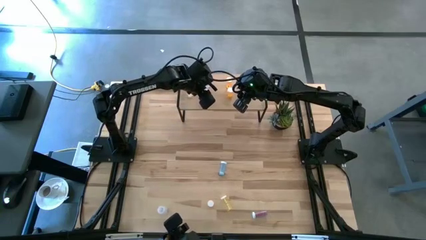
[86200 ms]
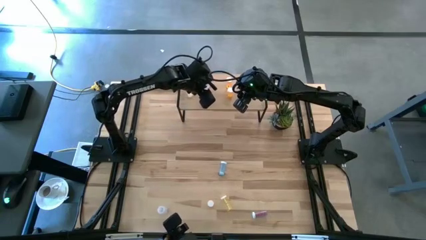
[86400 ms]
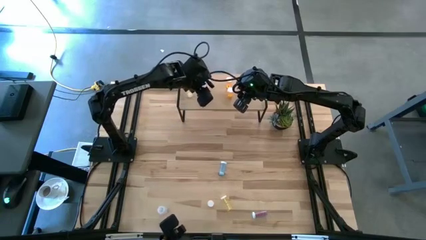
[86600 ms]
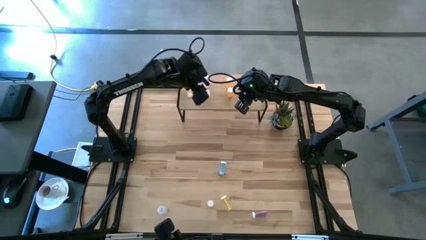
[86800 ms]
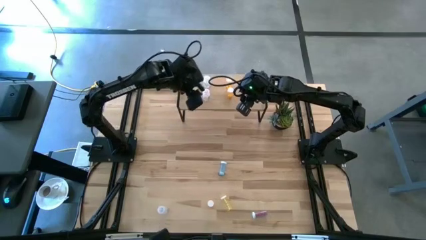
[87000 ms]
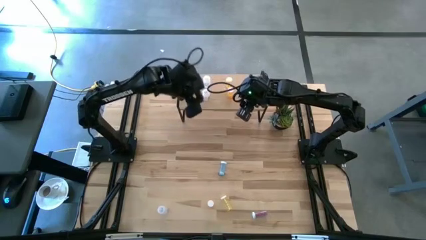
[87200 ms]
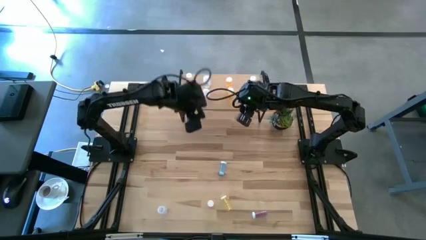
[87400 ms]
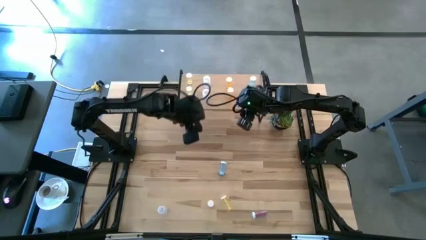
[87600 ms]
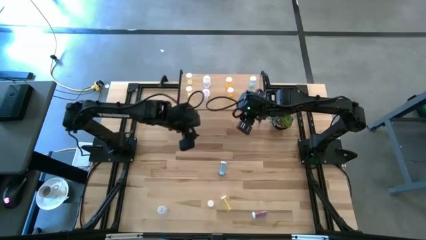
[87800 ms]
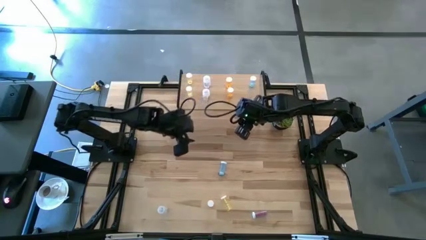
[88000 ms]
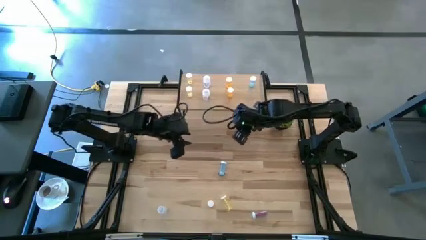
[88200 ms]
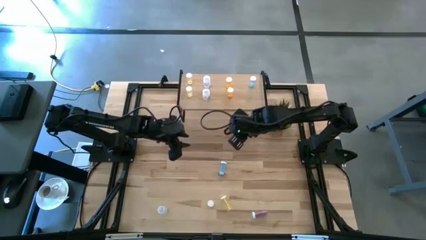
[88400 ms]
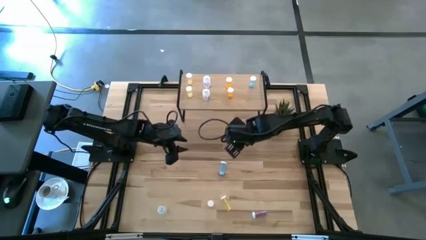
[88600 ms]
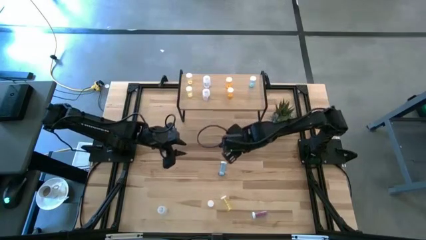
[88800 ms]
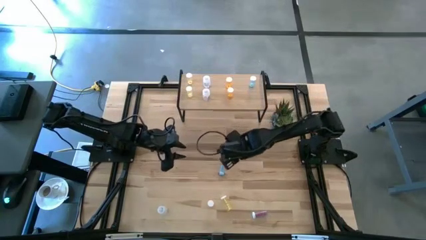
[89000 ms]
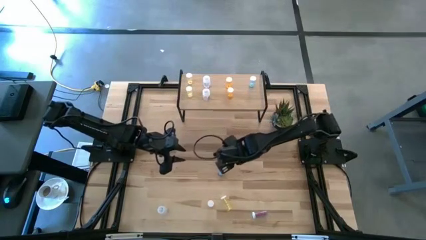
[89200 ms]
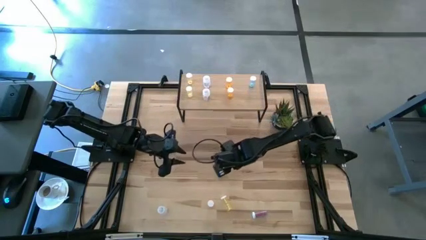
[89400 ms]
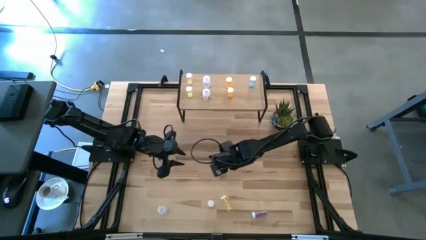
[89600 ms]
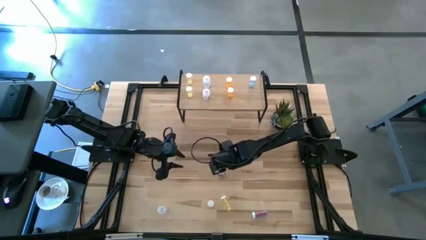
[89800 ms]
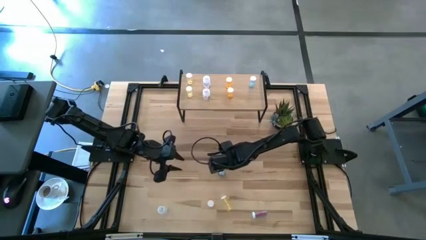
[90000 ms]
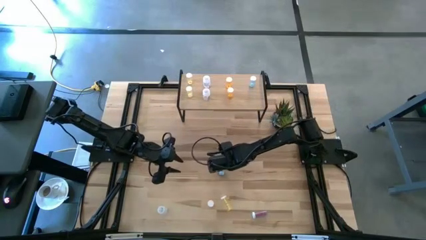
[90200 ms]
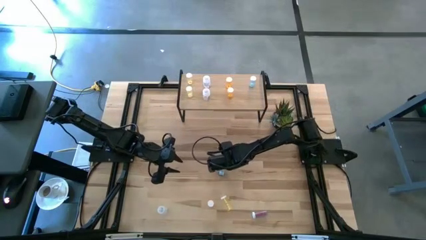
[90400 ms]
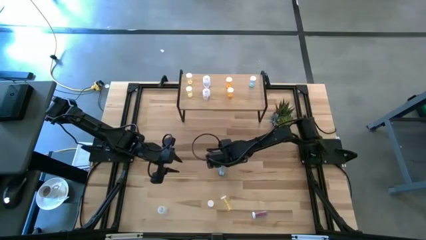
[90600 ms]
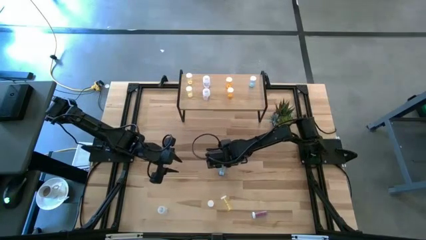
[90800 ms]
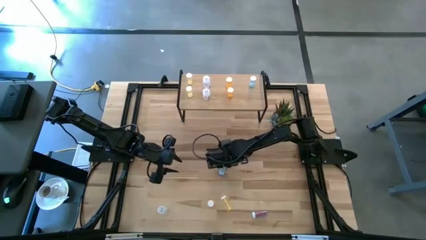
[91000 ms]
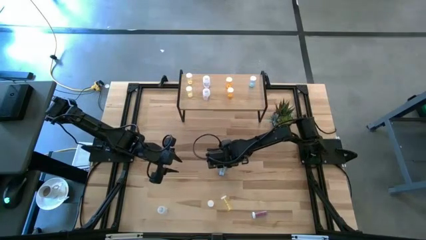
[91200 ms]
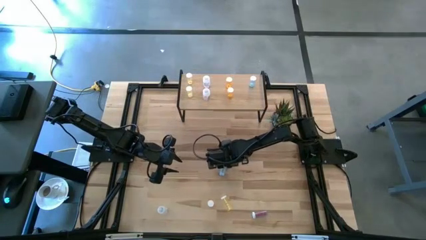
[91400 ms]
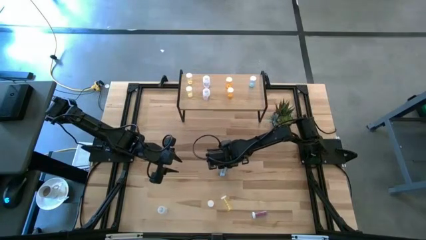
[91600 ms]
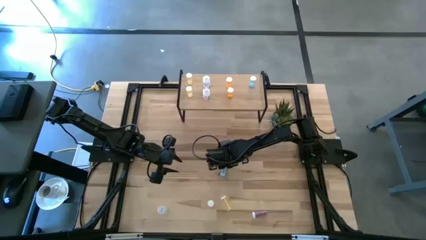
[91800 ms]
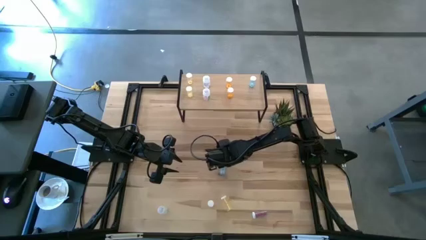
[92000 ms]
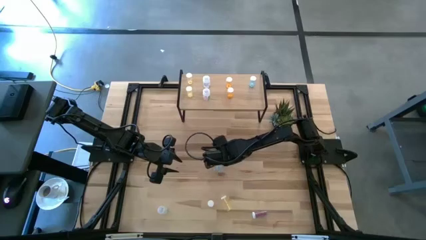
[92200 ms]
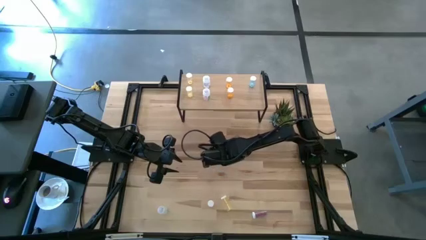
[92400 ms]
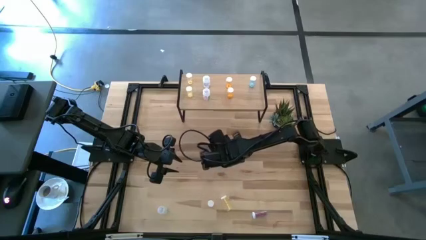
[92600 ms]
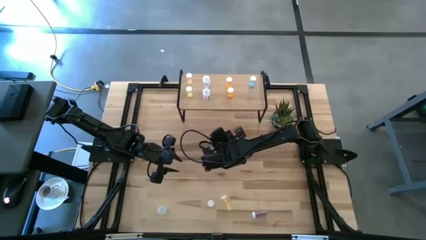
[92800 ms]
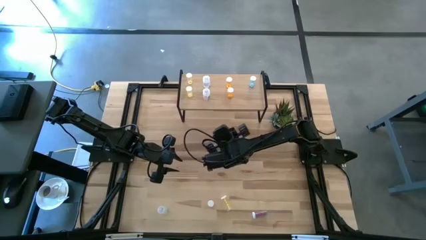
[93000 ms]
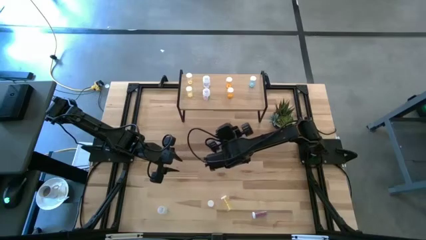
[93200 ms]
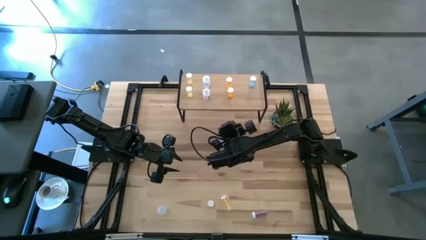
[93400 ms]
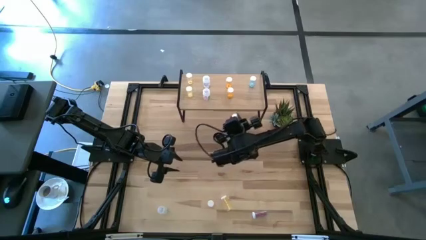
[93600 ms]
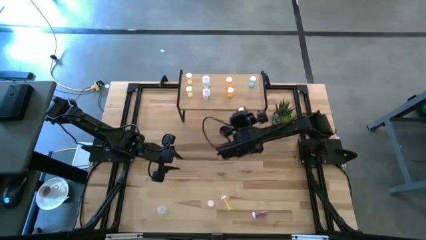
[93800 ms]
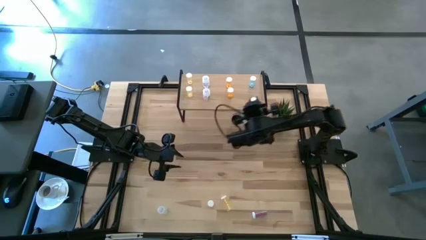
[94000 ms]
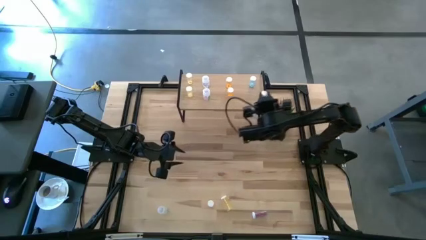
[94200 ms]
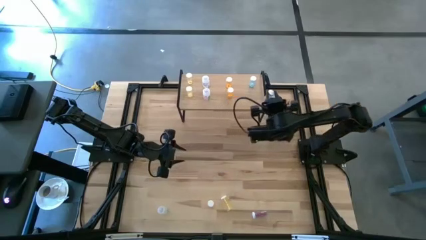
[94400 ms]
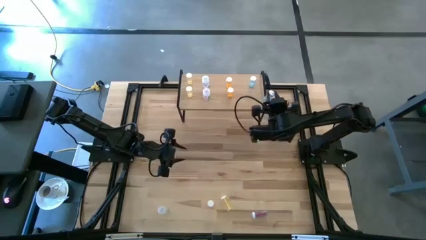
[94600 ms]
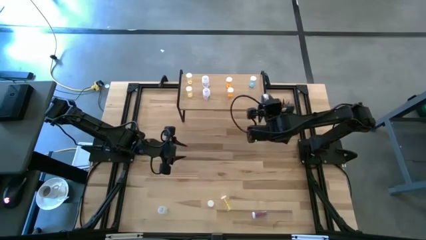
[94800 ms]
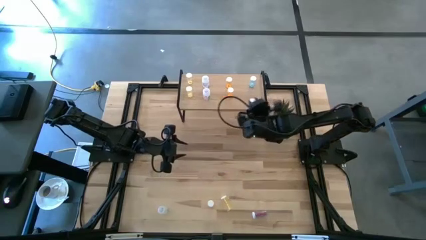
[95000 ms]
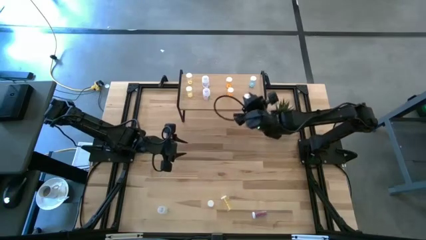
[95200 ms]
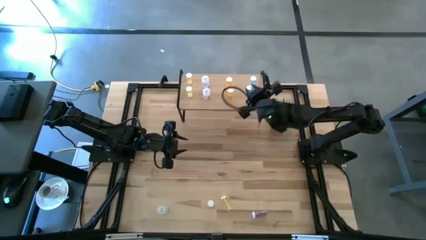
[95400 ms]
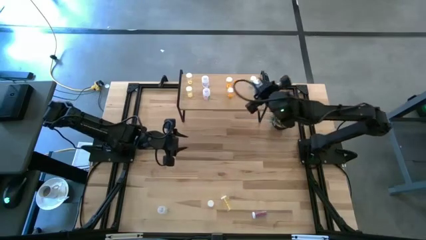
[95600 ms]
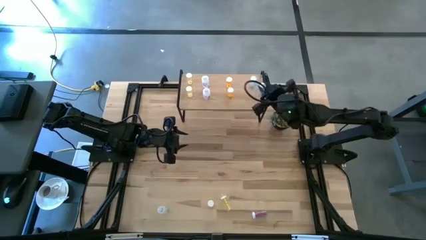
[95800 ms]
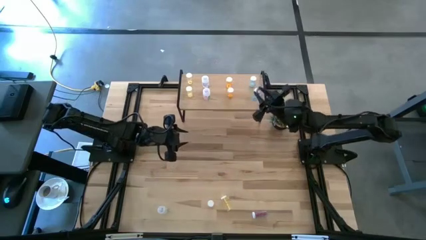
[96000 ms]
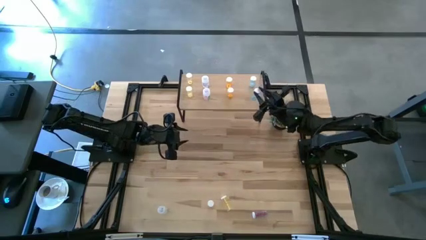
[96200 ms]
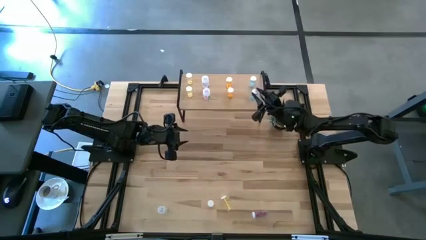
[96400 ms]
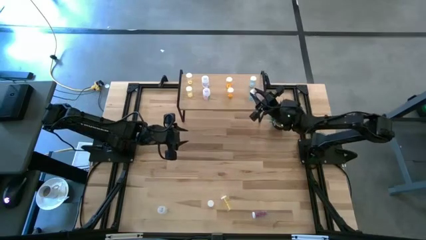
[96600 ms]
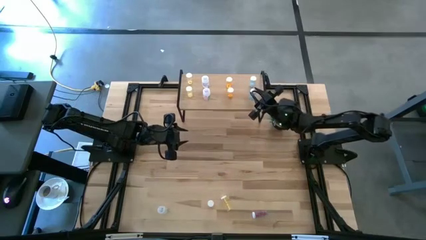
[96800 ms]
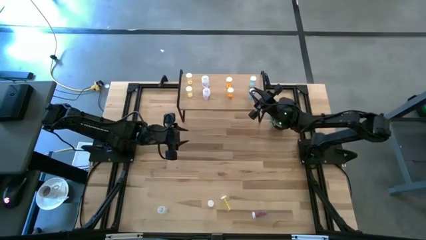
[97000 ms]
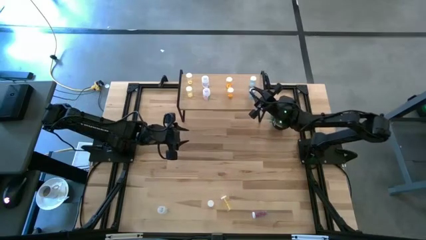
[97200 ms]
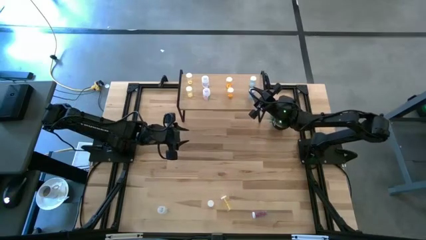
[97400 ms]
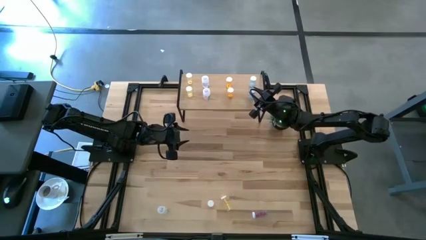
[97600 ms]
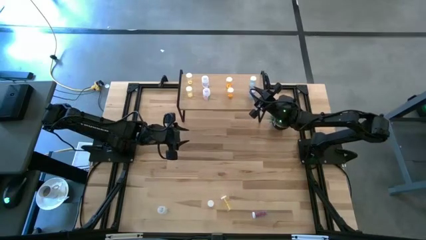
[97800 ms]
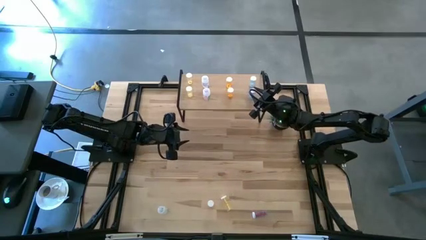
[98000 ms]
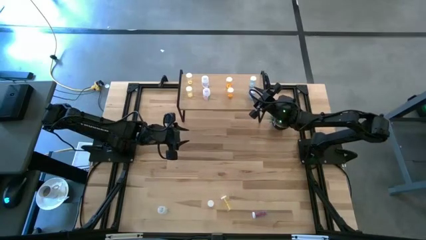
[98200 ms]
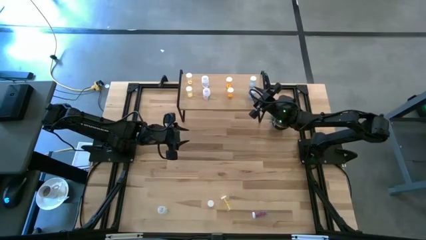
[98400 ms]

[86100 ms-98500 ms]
Task: Pick and place medicine bottles onto shelf by color
Put the top blue pill bottle on the shelf aligned with the other blue pill bottle
